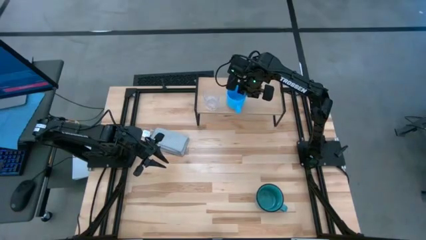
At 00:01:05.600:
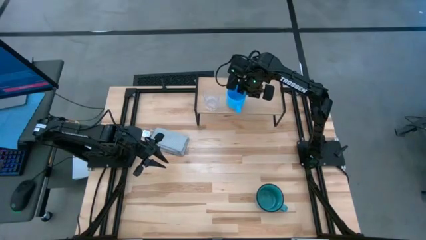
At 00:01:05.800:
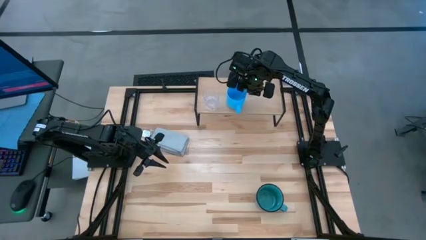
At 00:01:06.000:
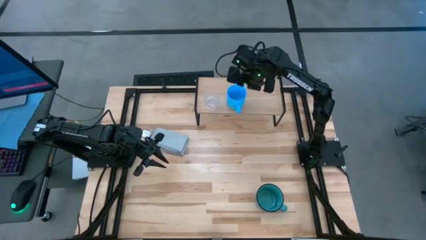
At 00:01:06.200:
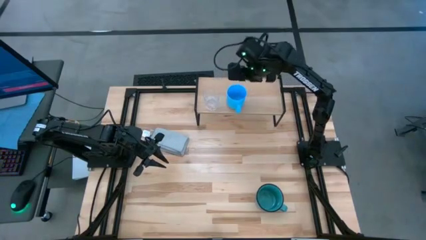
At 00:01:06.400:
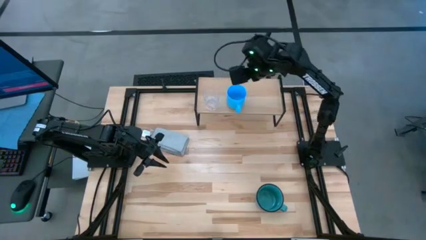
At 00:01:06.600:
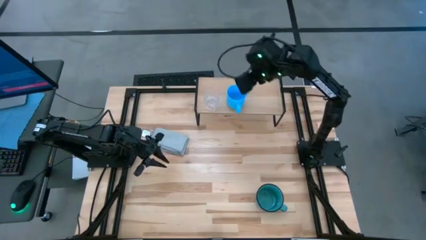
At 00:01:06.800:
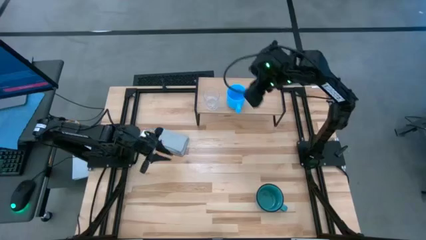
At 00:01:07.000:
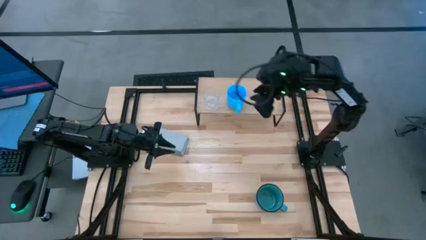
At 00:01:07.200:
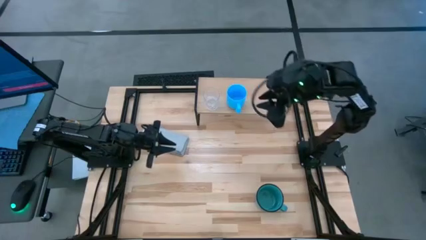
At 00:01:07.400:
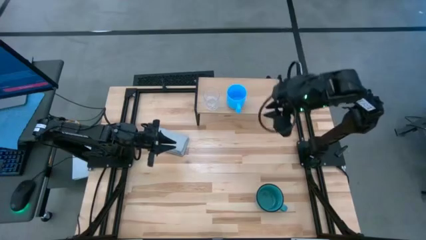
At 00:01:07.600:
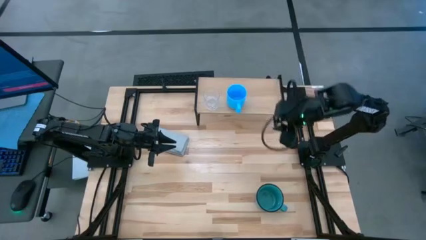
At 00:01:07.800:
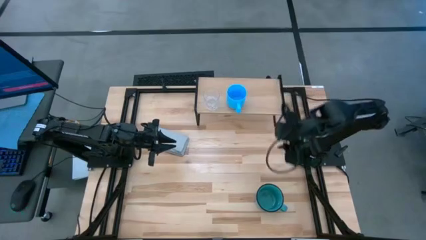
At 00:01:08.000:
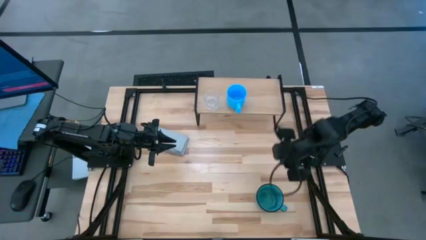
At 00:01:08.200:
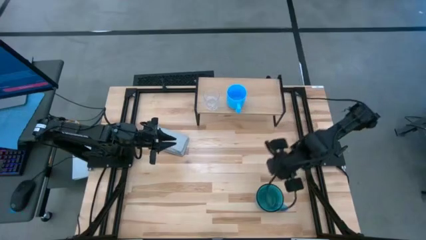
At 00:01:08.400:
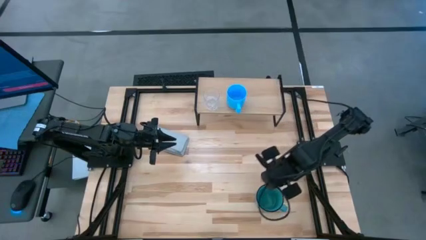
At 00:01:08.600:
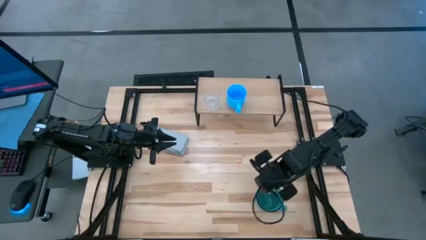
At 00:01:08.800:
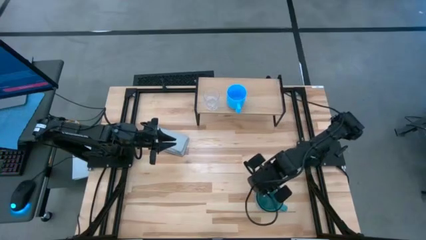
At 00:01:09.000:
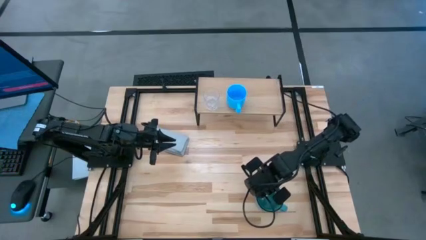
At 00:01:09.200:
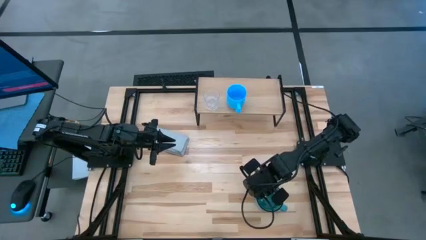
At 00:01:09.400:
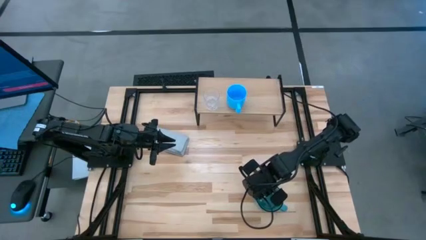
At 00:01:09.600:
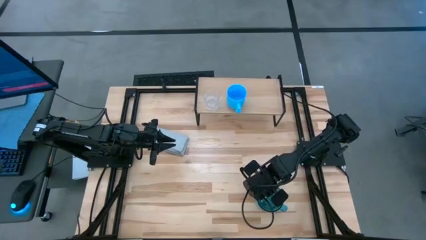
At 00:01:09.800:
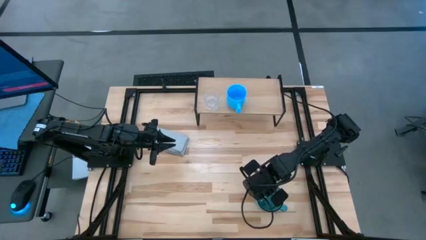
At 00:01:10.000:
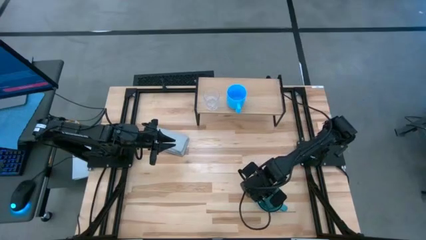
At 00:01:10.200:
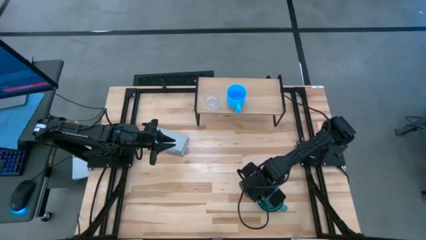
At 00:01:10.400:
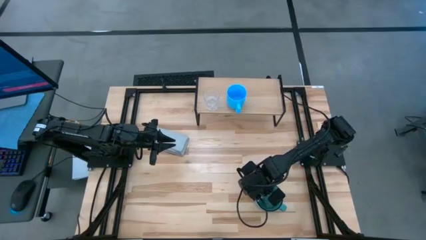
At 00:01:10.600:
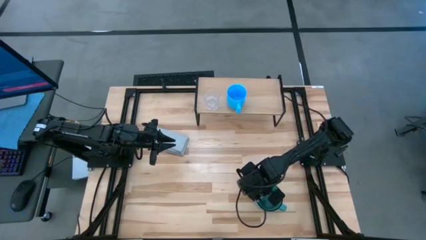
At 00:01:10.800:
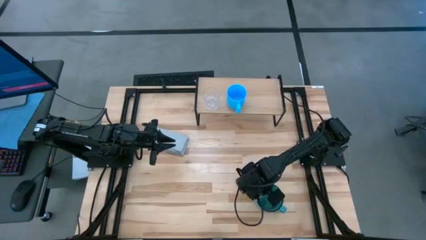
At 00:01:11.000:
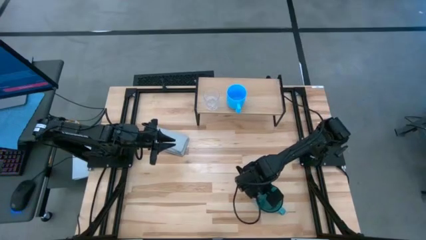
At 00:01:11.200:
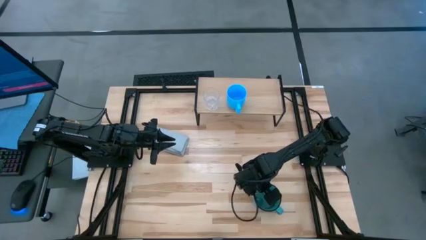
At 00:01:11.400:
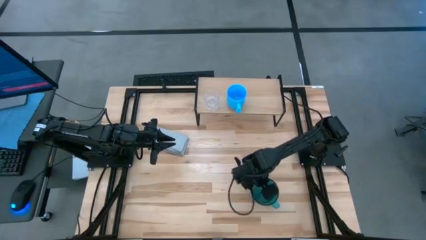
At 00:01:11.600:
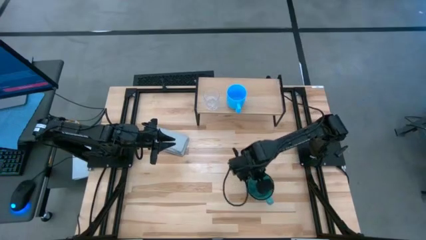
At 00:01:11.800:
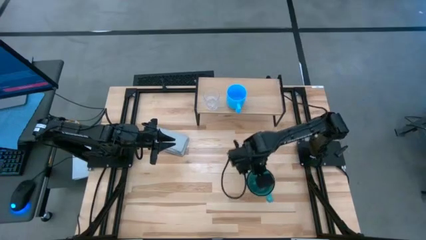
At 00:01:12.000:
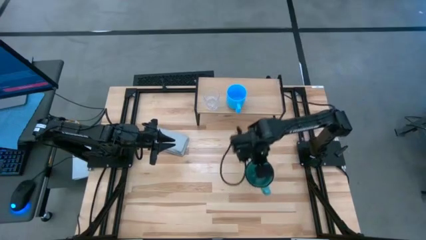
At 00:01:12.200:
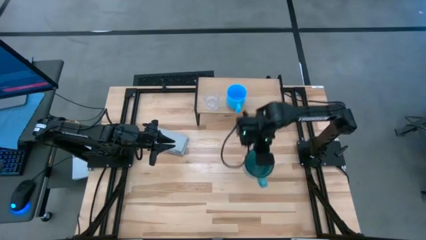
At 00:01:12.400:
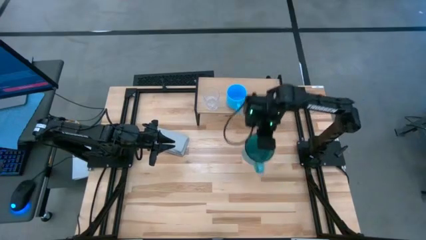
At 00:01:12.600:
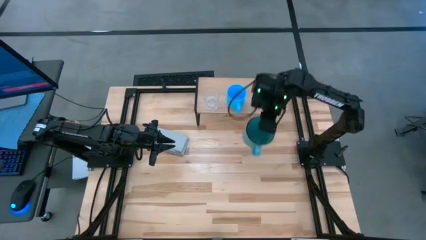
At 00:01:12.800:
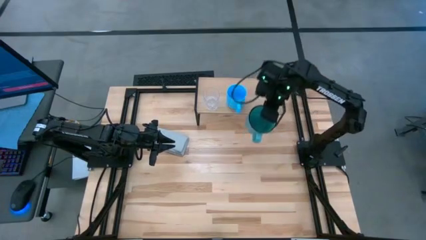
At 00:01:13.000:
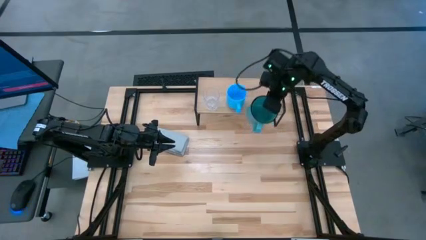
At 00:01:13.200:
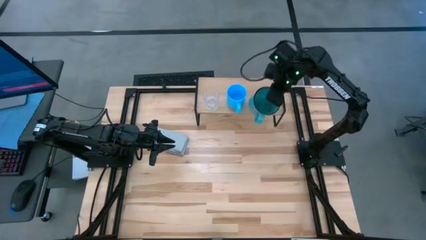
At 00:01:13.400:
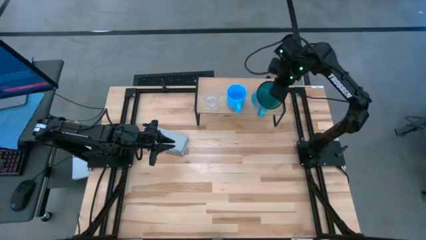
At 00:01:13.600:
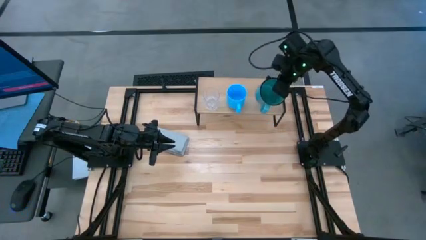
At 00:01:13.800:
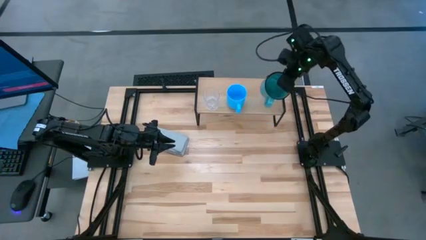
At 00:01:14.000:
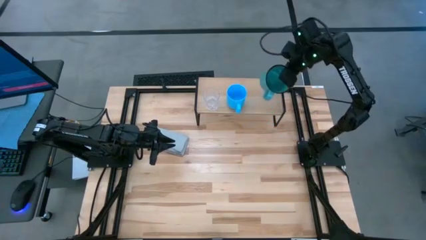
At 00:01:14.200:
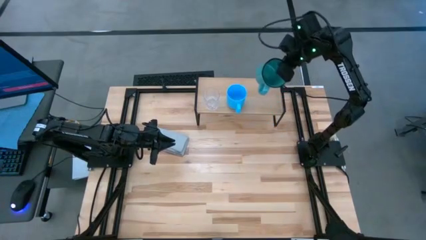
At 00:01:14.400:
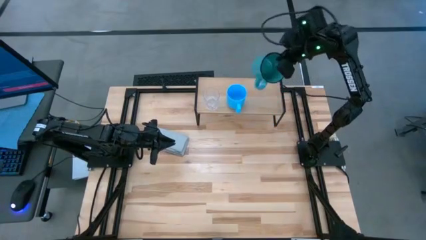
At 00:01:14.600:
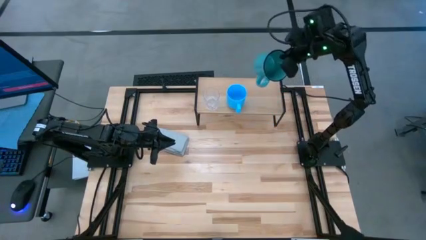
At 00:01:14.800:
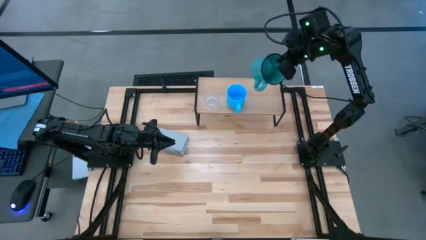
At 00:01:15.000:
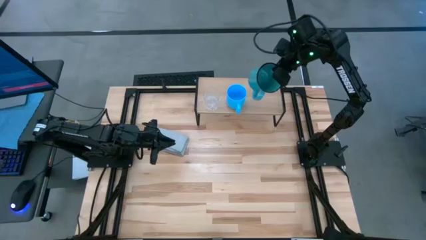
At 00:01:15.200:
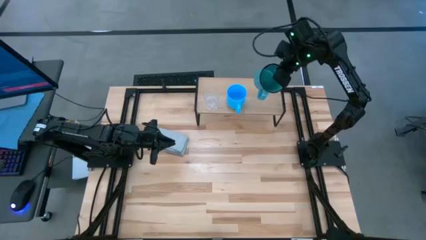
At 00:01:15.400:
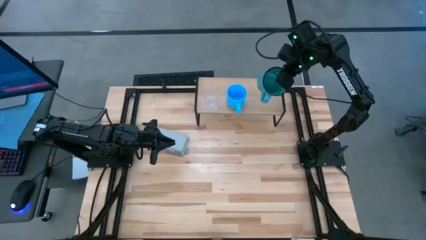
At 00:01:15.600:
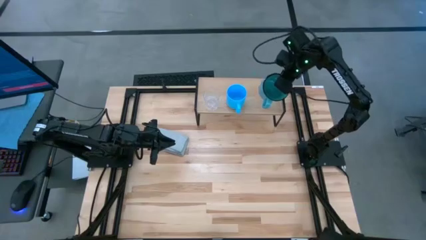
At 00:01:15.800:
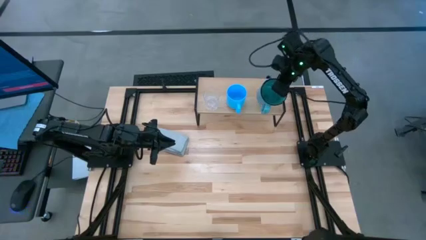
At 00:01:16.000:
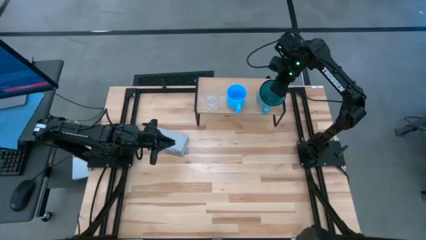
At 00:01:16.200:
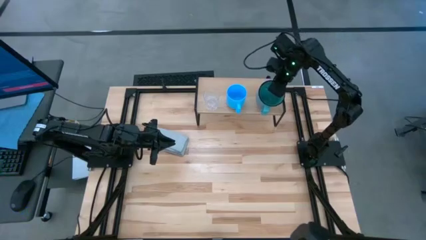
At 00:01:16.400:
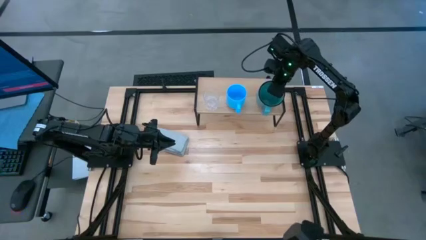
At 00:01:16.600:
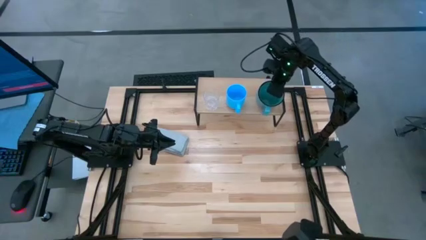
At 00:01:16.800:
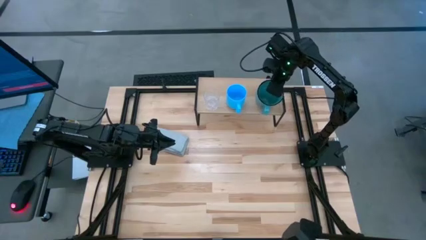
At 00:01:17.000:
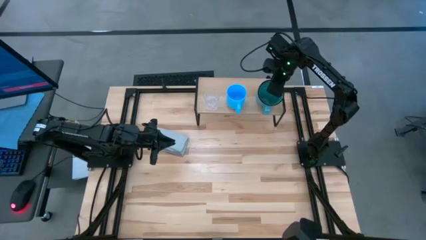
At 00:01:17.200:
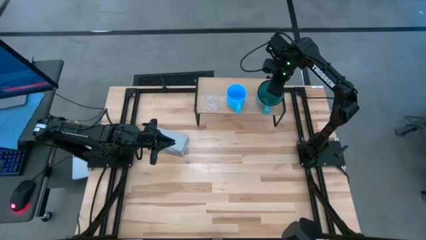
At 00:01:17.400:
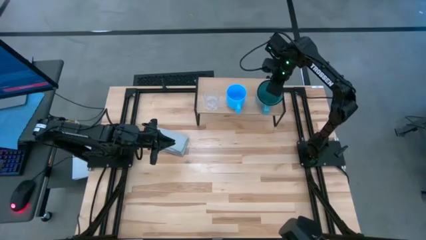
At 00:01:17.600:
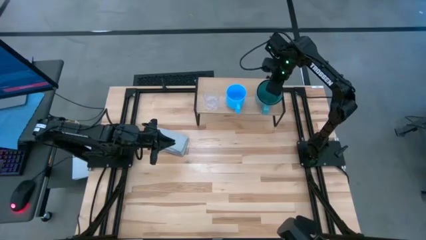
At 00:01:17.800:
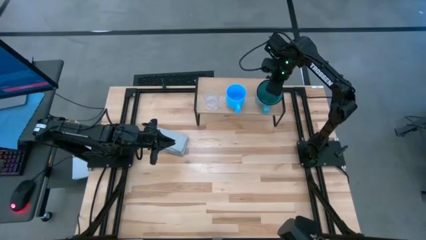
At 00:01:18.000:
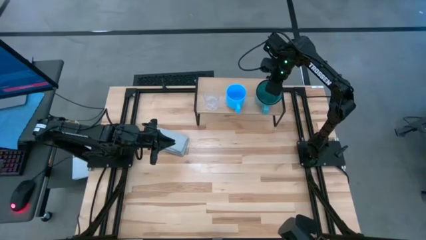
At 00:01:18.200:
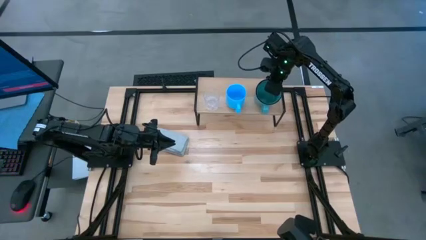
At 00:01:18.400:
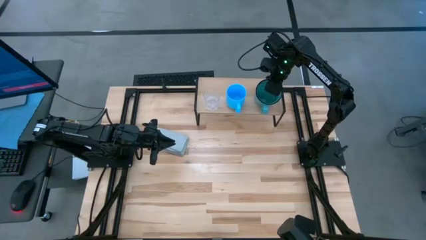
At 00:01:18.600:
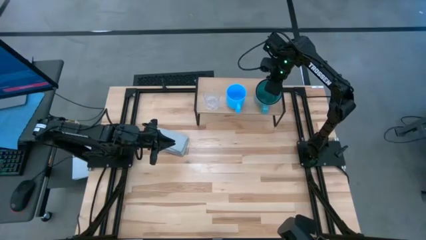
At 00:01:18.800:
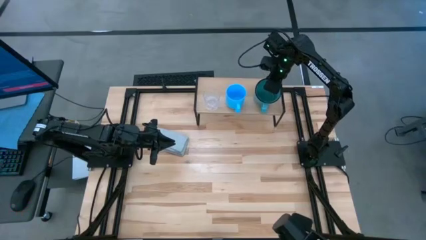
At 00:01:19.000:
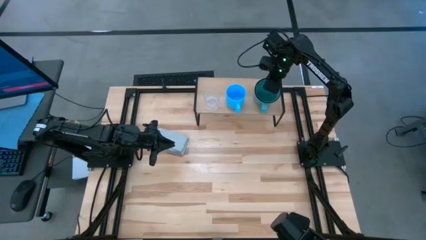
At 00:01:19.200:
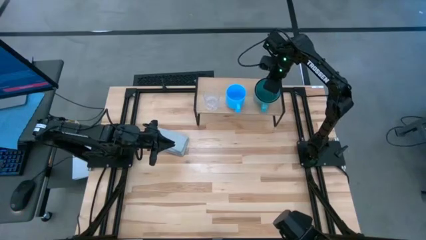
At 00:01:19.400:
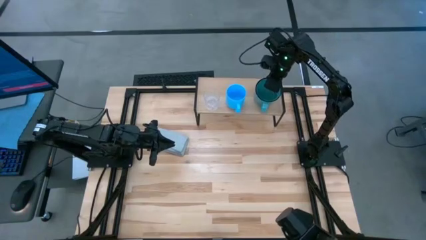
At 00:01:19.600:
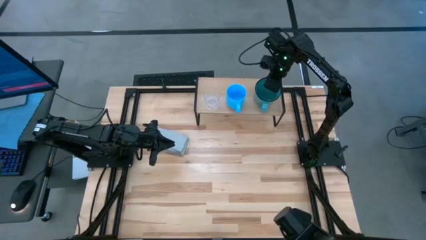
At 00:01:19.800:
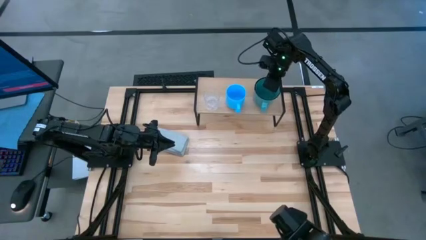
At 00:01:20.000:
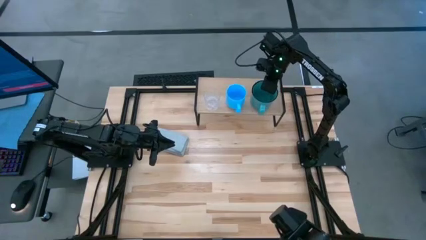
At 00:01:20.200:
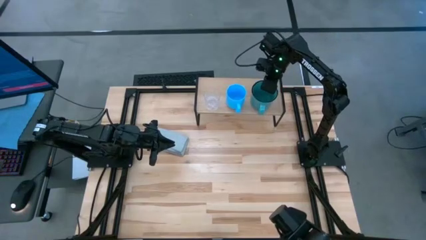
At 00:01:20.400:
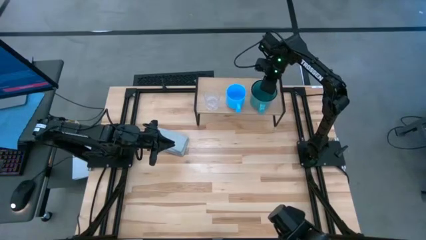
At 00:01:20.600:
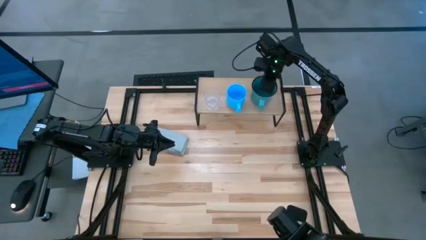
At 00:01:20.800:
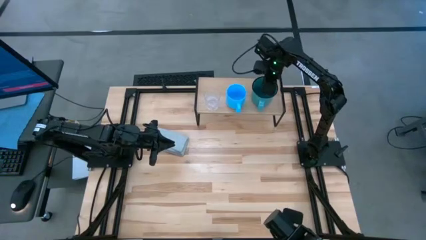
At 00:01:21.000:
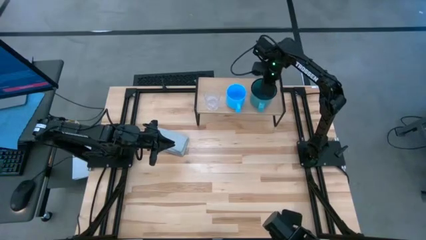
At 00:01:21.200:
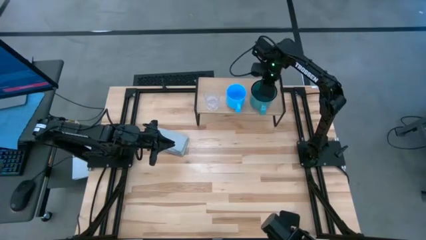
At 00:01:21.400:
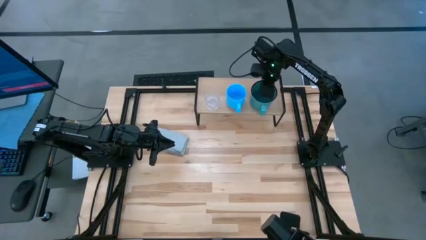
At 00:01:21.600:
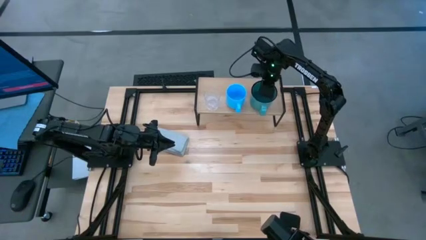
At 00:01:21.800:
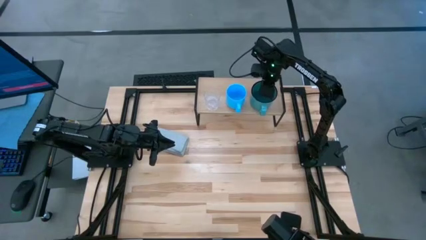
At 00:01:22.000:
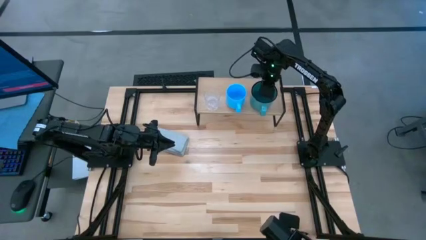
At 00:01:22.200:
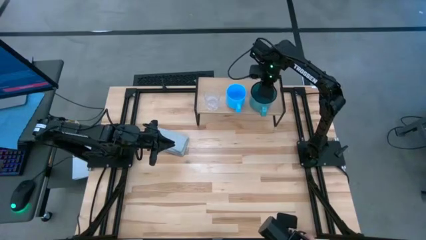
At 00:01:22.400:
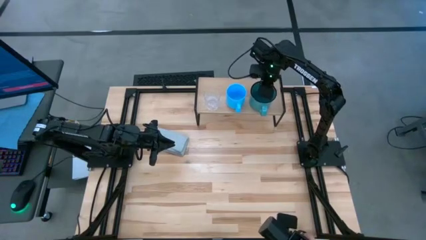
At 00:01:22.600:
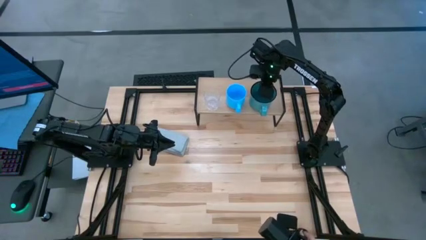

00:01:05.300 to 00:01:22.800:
Task: Stack small to large cups/mugs on shelf
Put the green mug on the shelf
